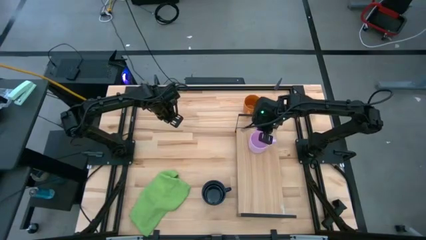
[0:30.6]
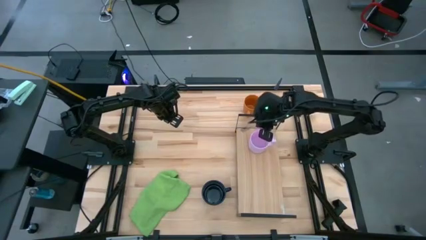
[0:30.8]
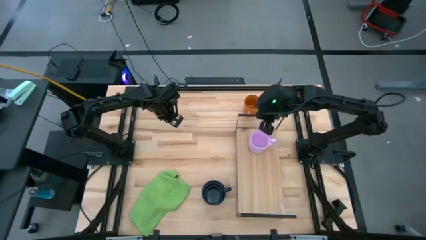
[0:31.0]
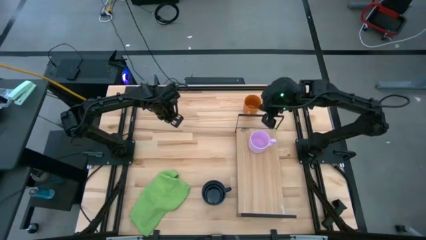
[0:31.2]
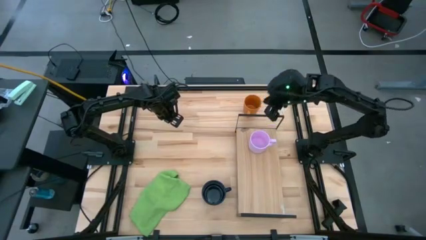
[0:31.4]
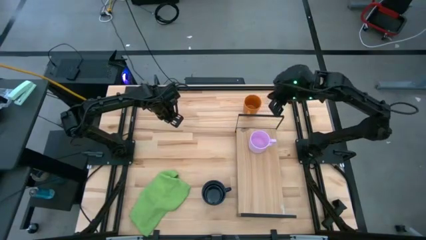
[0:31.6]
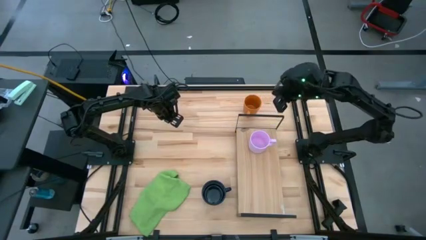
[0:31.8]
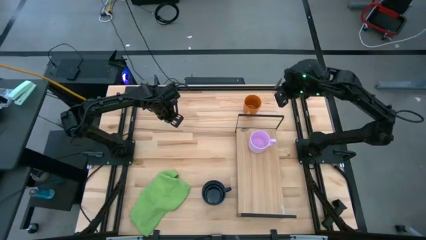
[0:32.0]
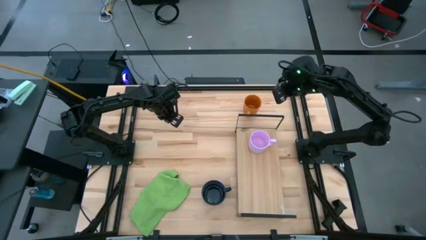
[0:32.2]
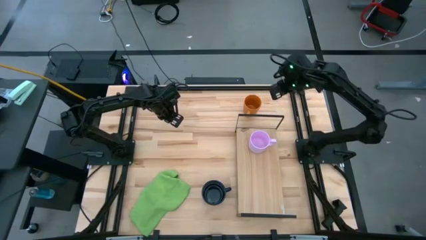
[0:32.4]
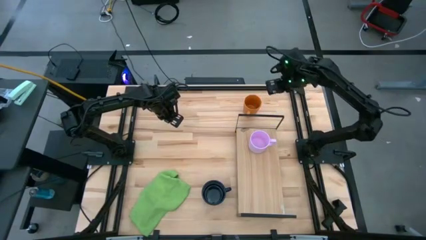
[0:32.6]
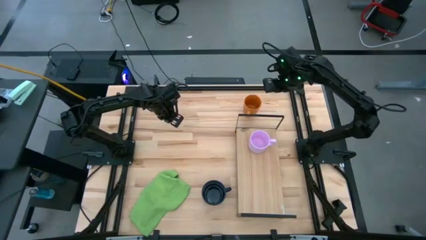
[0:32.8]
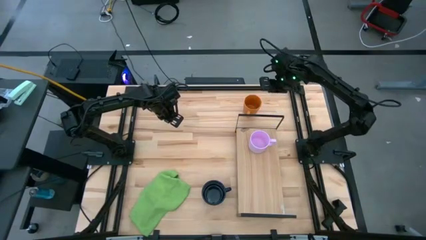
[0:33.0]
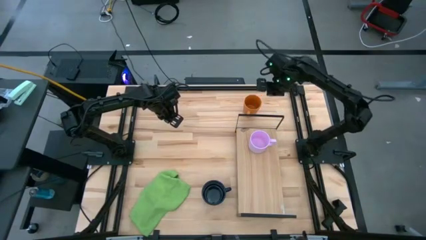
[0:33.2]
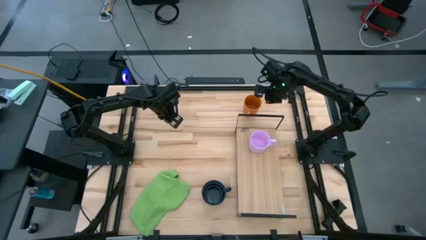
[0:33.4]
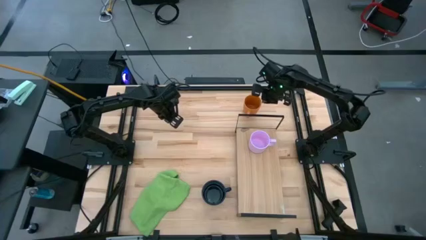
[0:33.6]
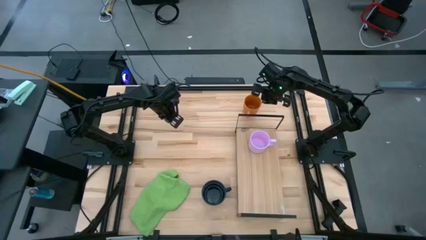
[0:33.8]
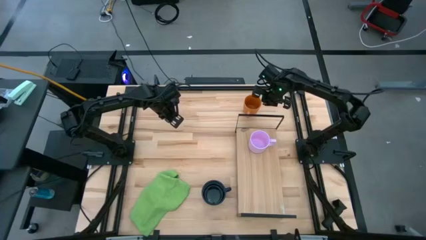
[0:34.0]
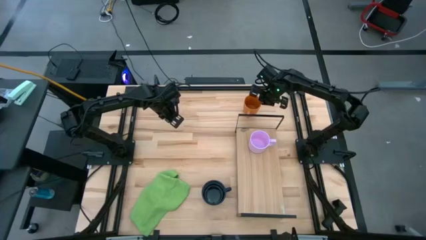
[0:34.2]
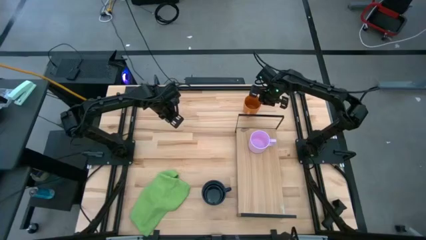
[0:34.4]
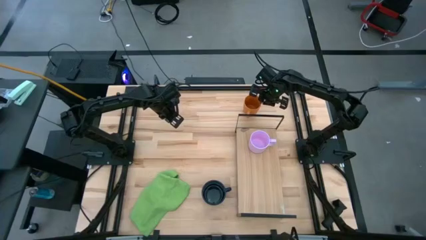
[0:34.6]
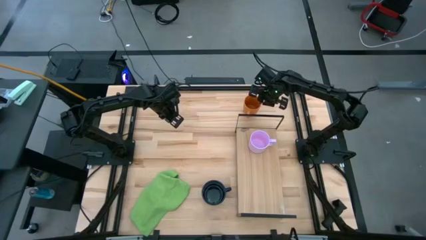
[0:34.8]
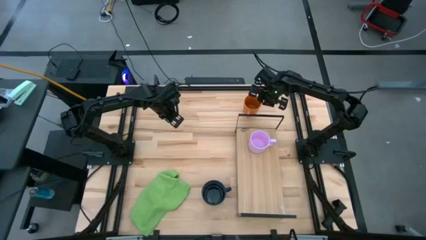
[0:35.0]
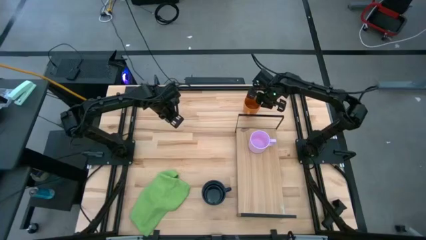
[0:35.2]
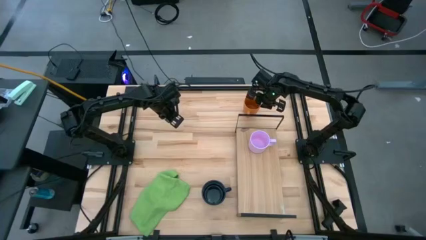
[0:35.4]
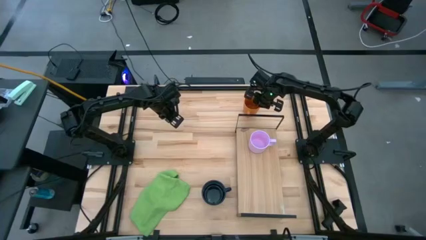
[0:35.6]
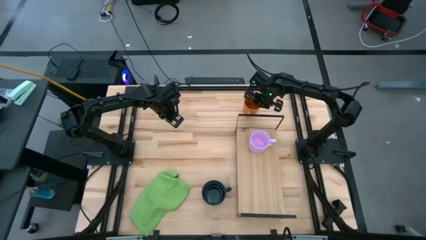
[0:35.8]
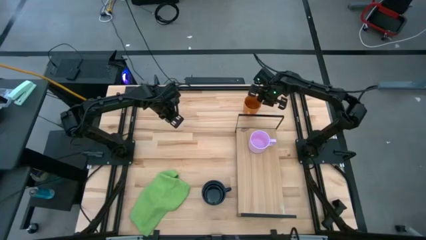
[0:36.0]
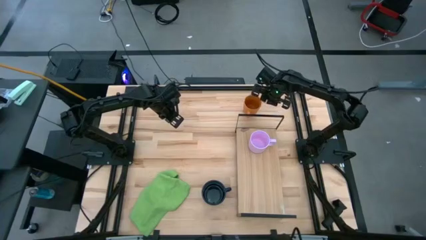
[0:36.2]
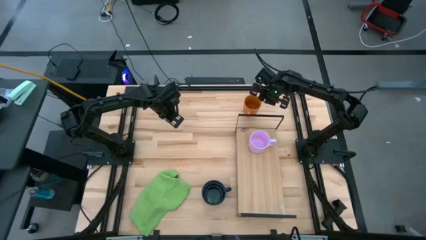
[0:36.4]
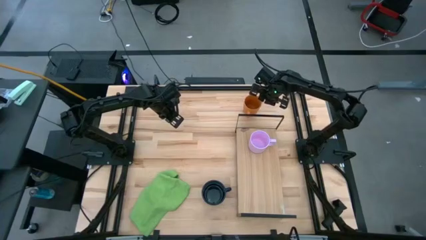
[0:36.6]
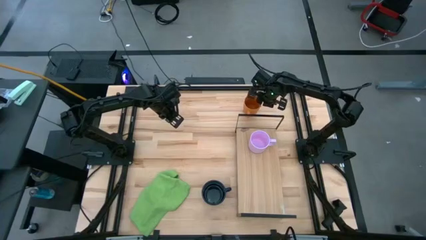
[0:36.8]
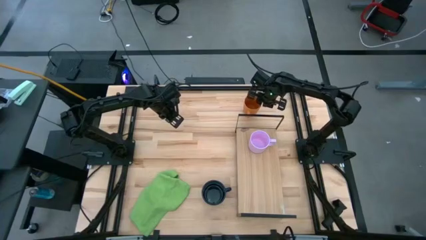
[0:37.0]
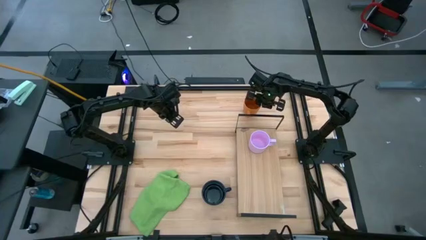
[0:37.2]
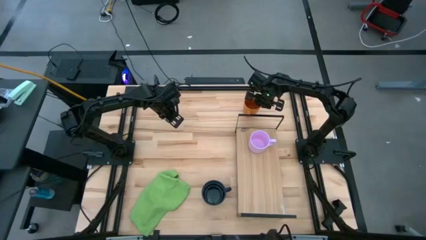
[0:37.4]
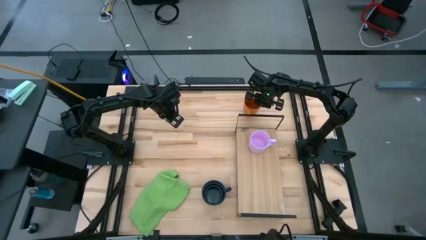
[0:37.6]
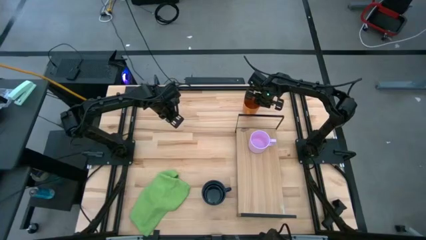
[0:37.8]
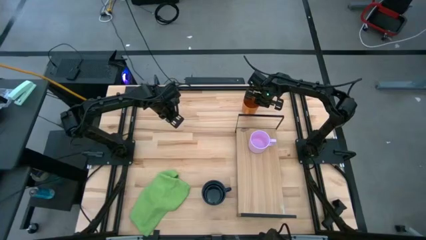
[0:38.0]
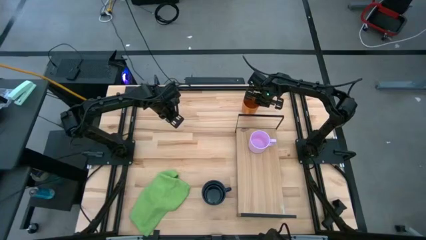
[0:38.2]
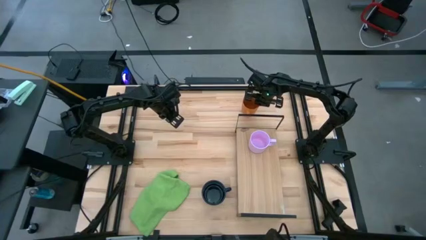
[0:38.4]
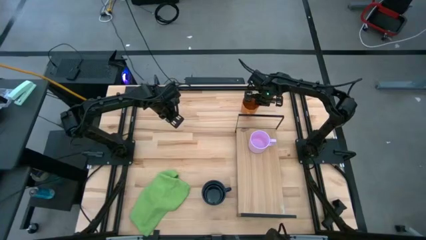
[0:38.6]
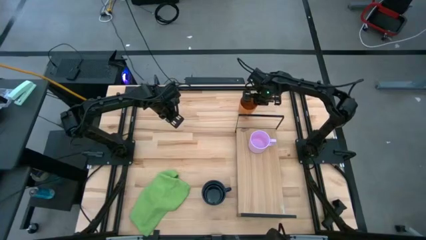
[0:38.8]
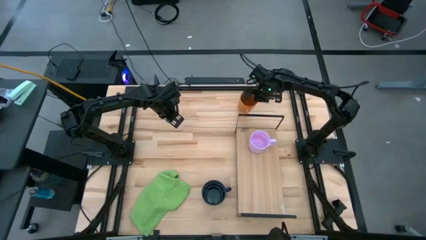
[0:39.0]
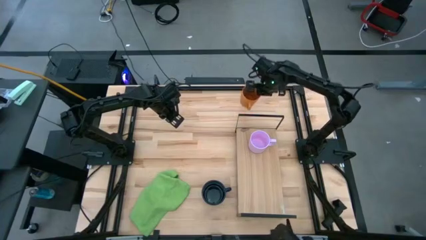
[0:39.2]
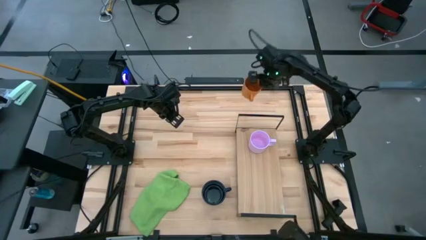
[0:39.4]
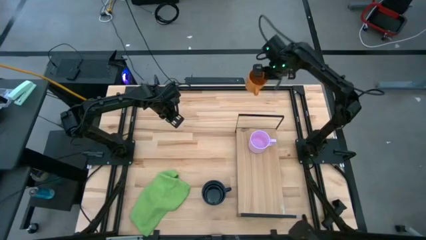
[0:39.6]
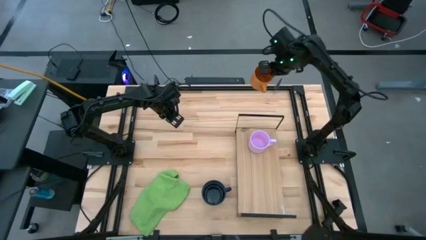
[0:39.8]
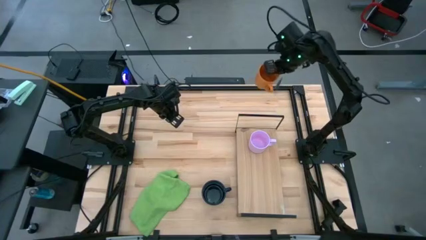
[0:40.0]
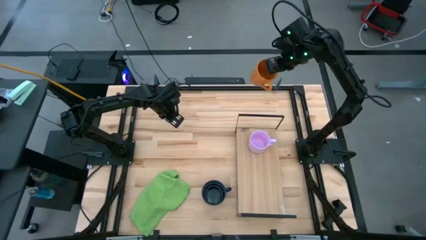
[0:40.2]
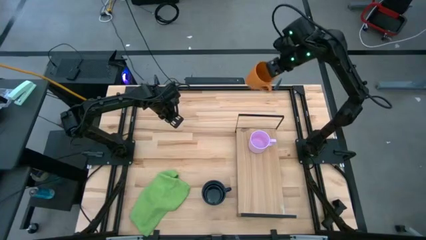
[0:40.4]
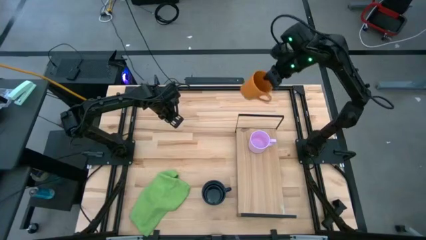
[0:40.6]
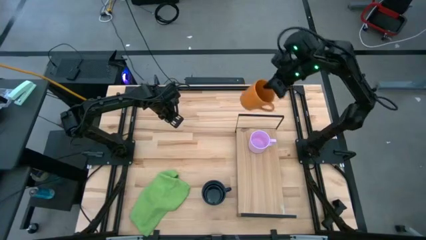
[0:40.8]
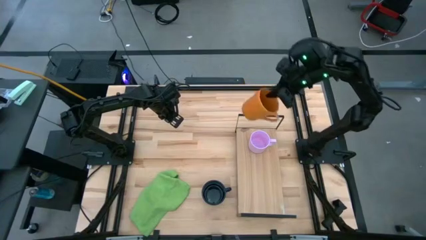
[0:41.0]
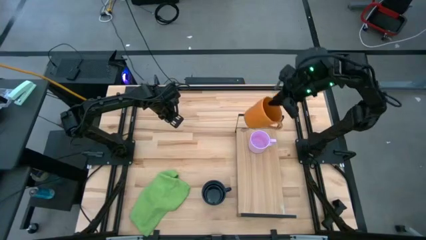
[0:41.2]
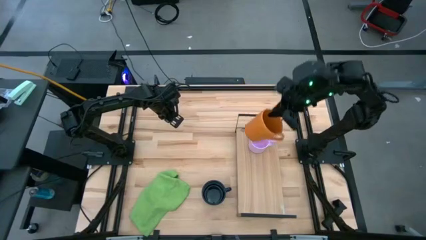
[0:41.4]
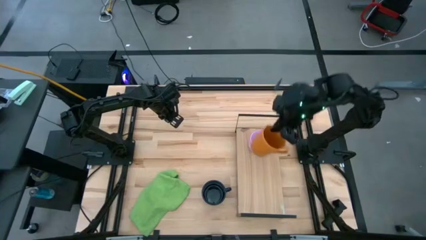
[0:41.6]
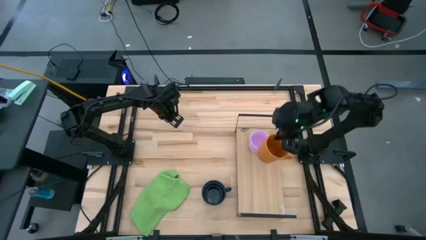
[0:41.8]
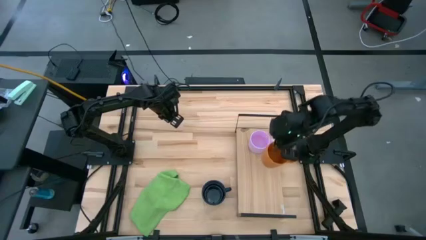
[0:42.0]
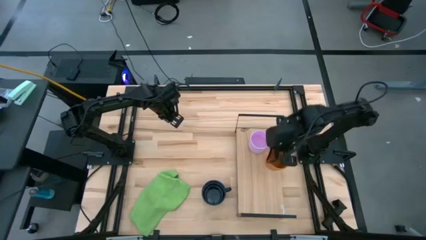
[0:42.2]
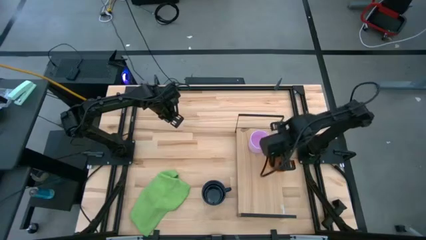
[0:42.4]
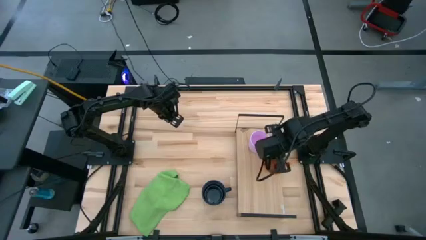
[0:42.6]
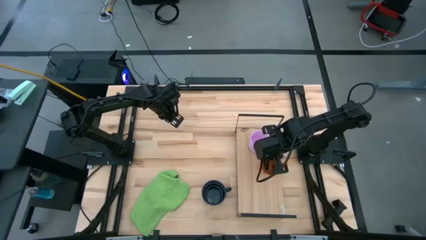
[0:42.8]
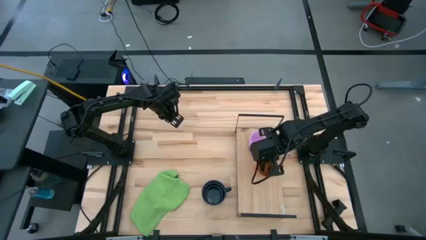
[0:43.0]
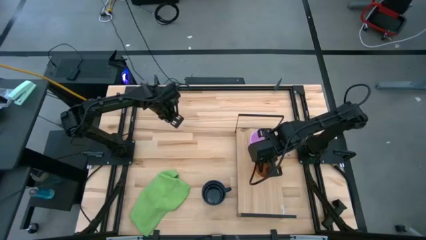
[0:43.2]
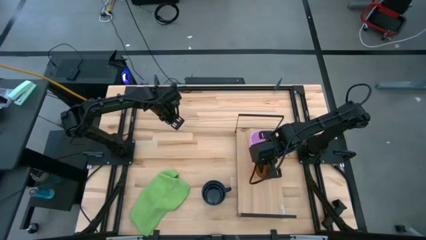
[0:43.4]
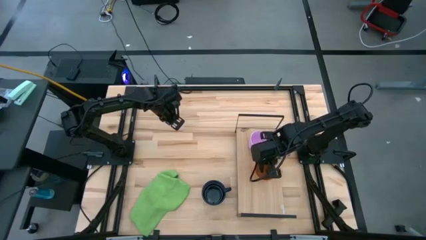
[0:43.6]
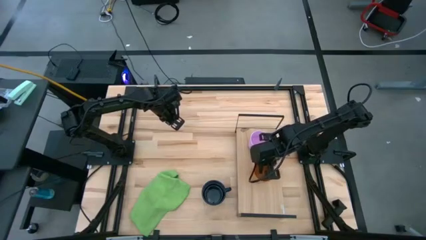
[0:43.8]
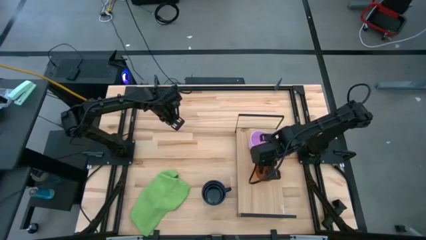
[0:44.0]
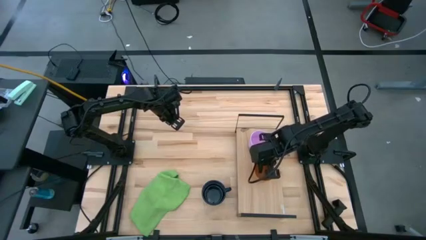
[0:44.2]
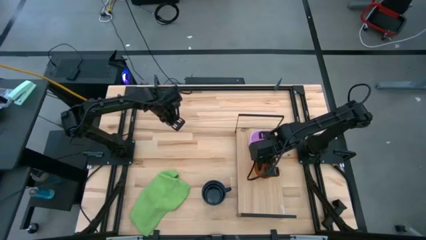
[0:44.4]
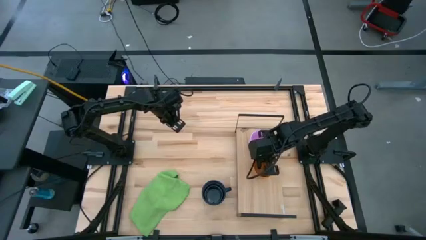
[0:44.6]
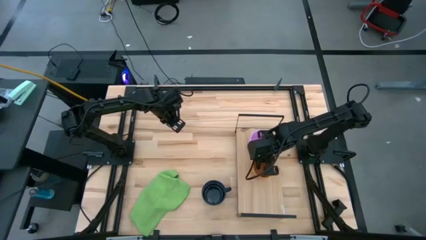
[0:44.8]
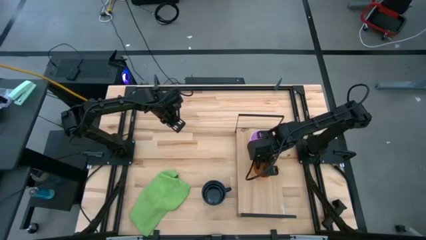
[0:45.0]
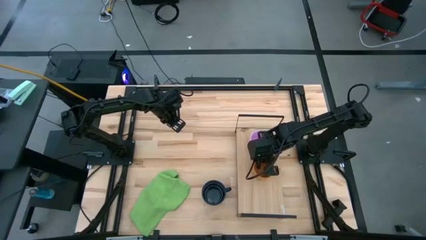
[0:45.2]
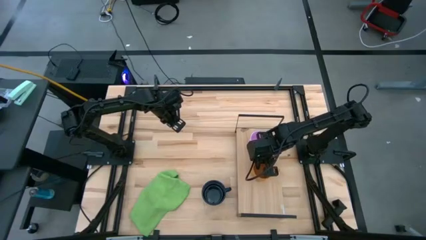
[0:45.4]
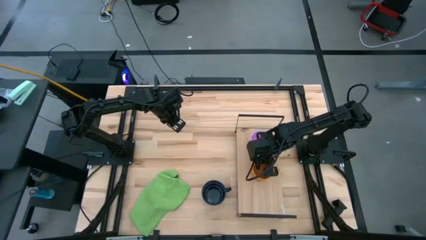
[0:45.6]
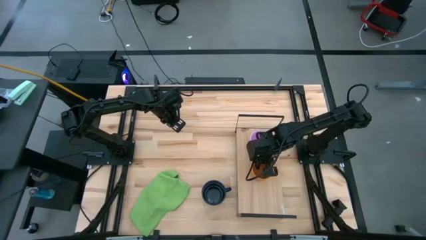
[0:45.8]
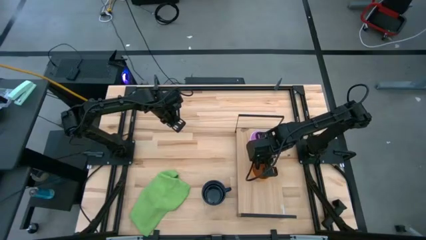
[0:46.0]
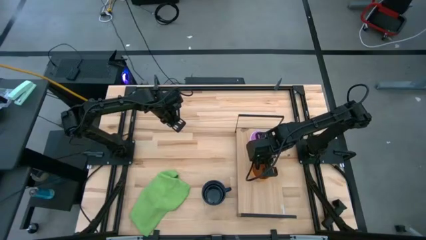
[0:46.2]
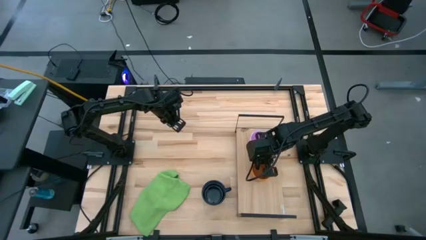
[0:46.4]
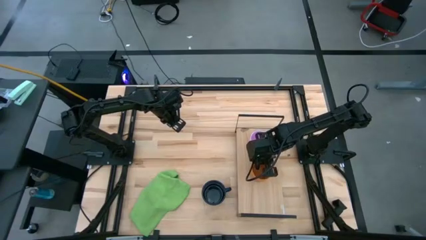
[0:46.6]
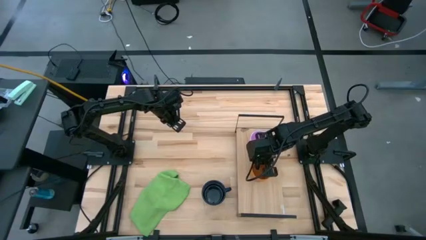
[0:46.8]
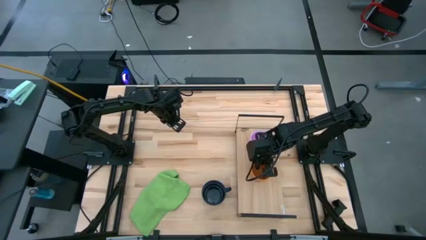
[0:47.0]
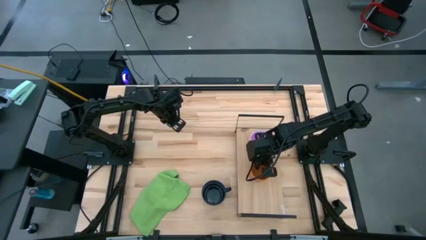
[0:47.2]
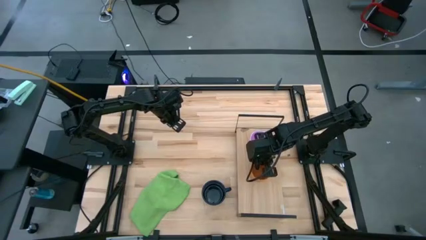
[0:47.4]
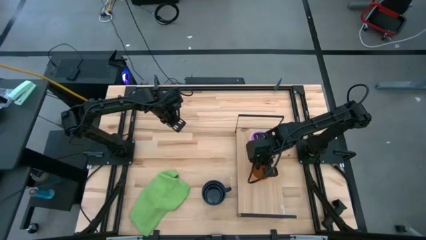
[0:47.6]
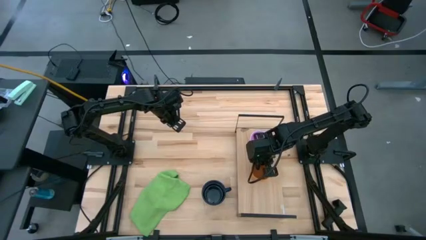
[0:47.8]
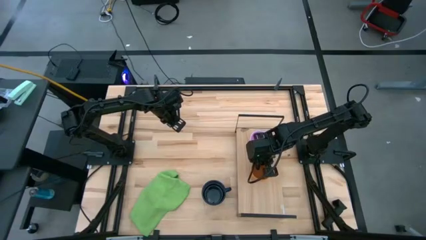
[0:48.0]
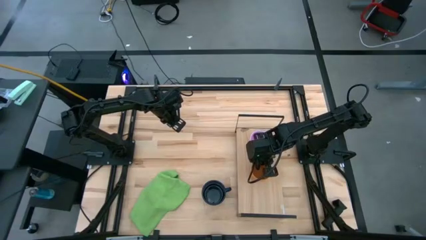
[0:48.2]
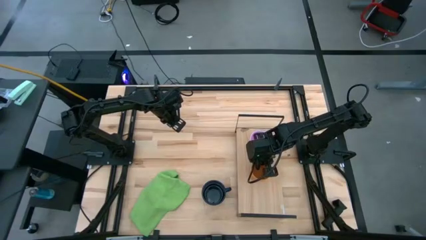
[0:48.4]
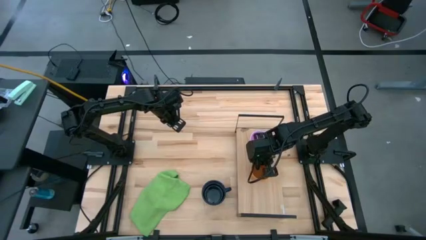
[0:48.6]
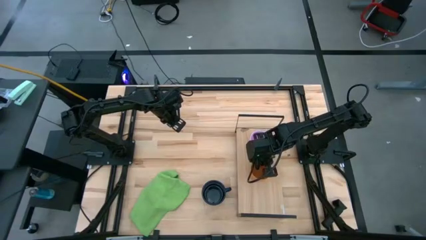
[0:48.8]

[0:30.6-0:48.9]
Task: Stack small to large cups/mugs on shelf
Put the orange mug on the shelf
